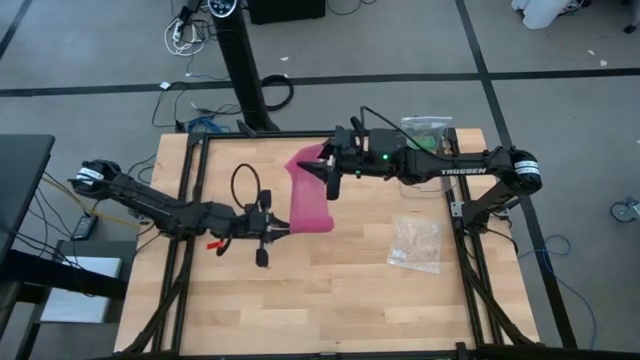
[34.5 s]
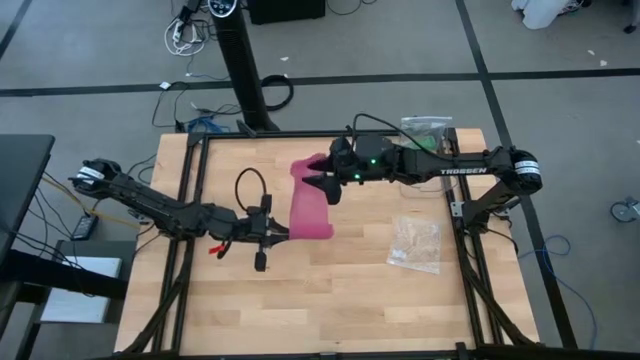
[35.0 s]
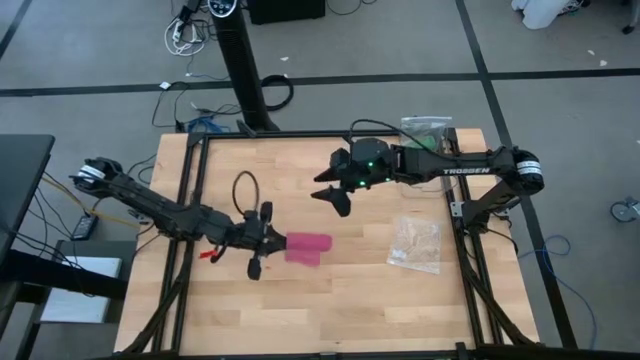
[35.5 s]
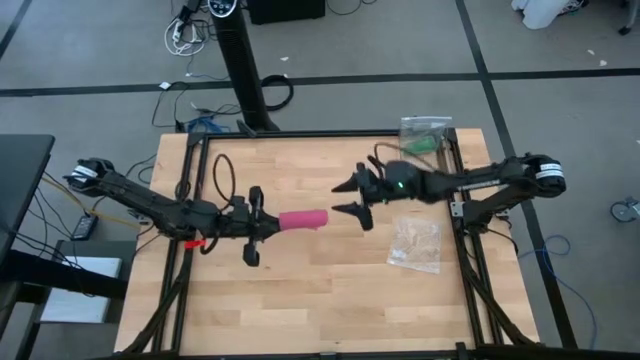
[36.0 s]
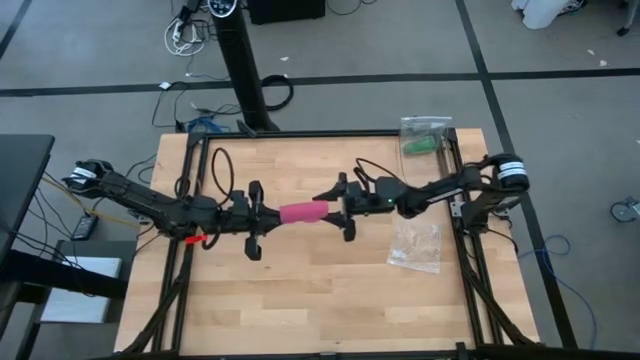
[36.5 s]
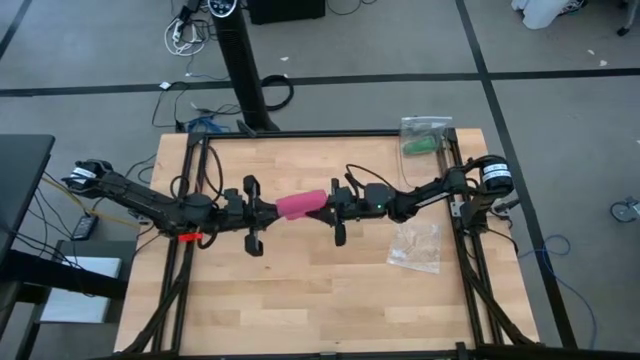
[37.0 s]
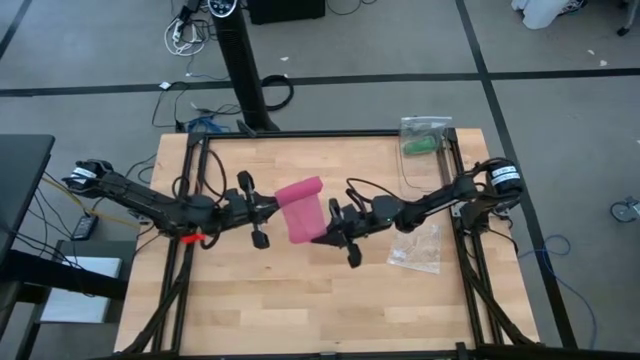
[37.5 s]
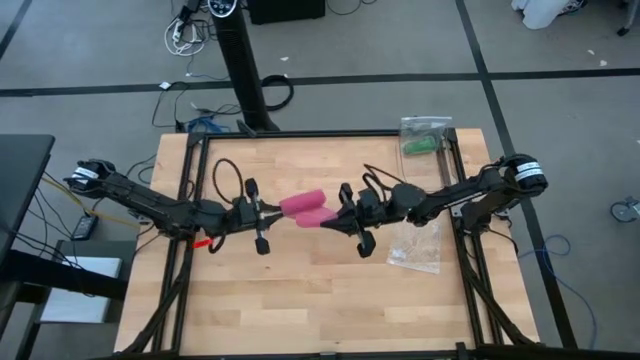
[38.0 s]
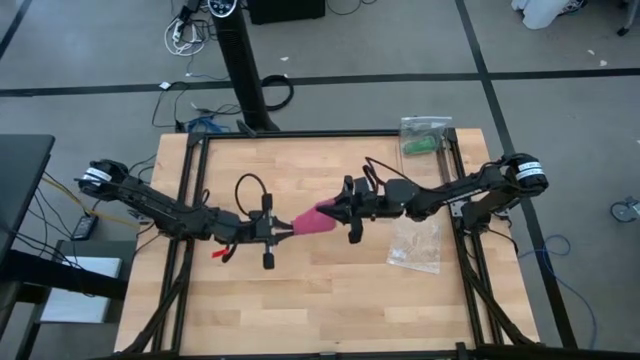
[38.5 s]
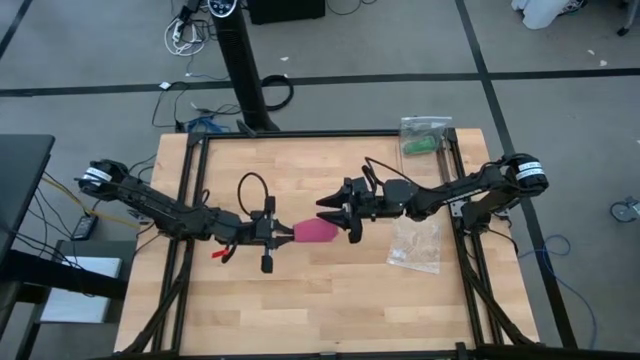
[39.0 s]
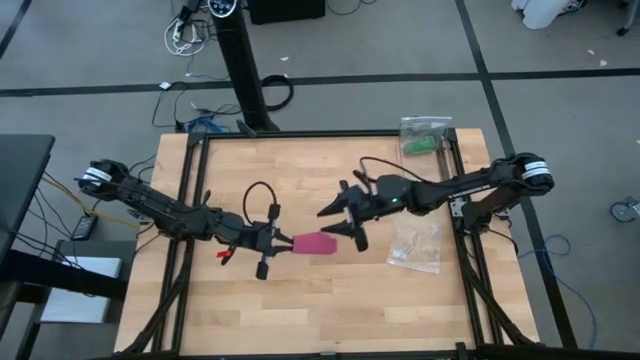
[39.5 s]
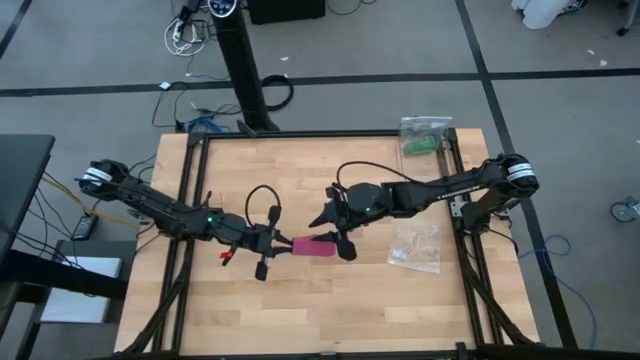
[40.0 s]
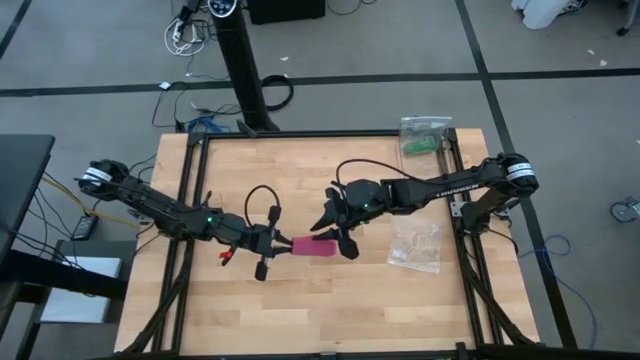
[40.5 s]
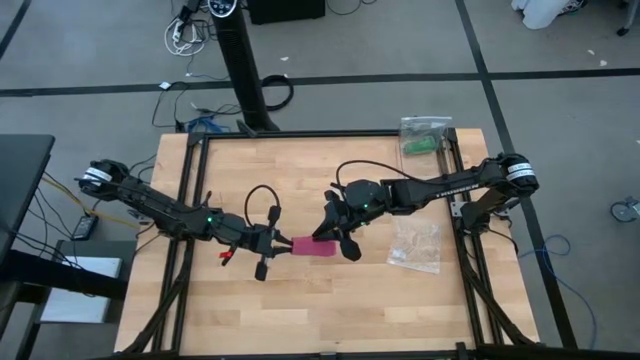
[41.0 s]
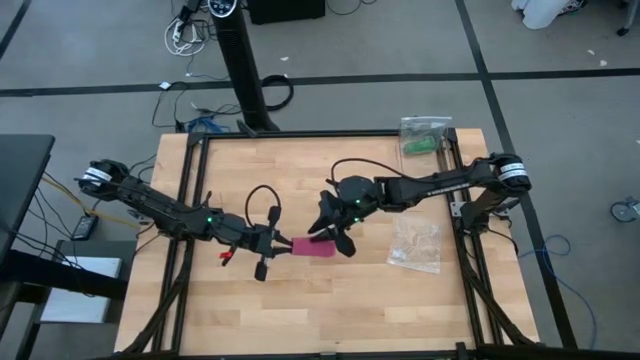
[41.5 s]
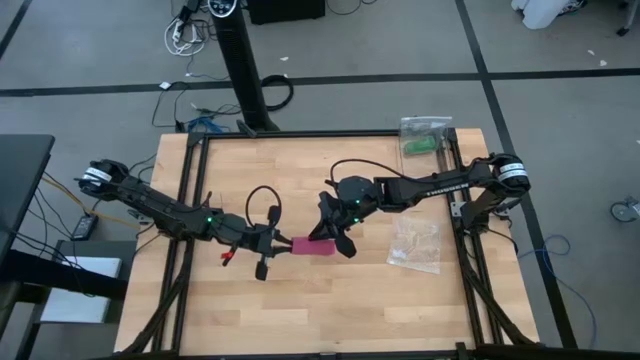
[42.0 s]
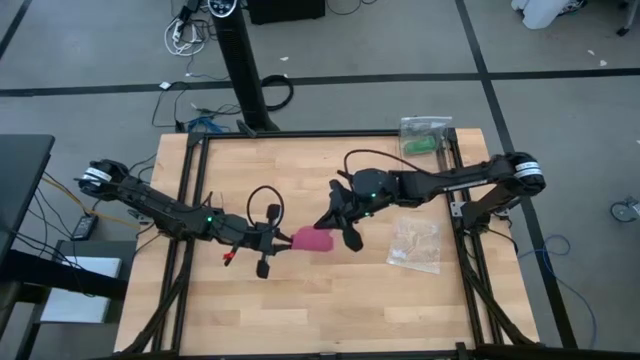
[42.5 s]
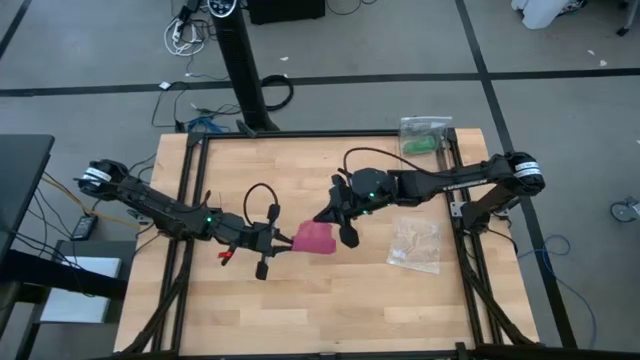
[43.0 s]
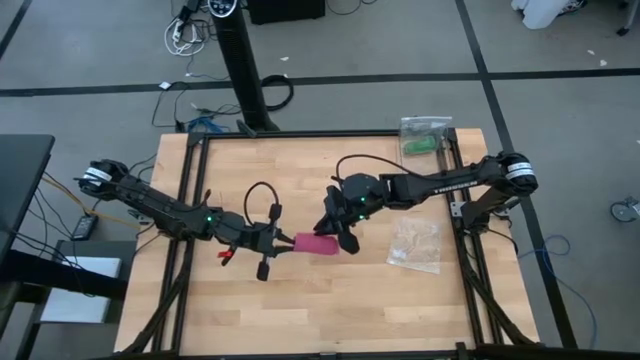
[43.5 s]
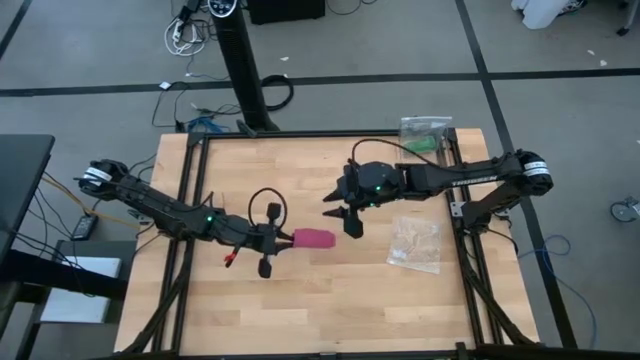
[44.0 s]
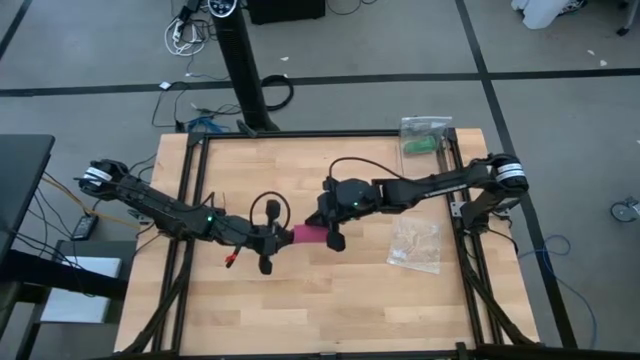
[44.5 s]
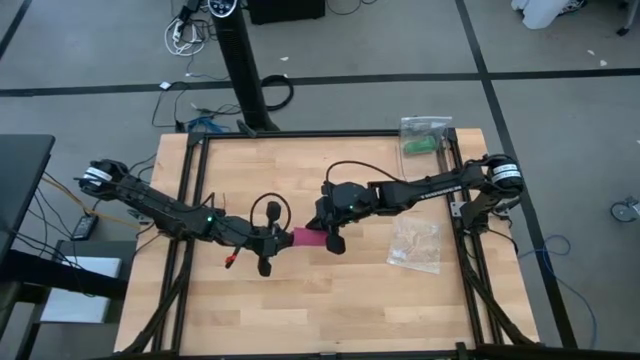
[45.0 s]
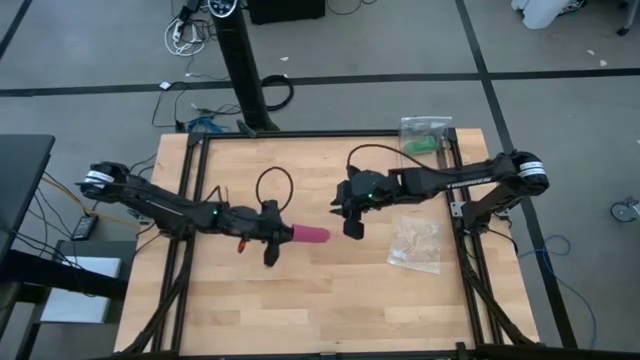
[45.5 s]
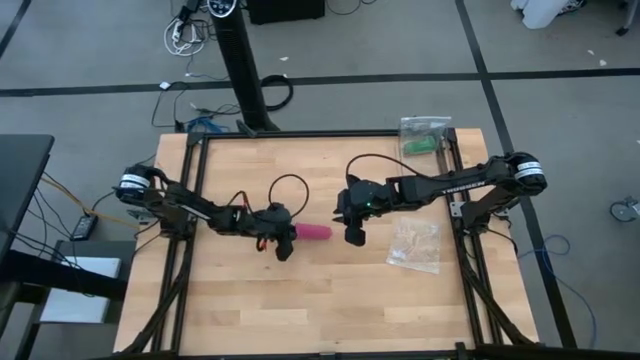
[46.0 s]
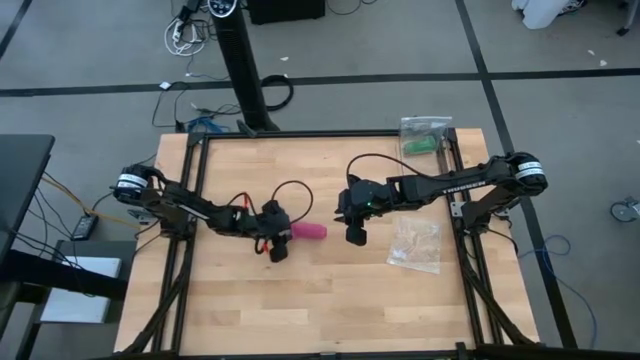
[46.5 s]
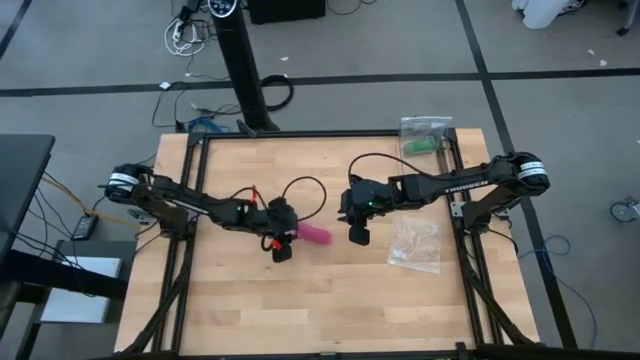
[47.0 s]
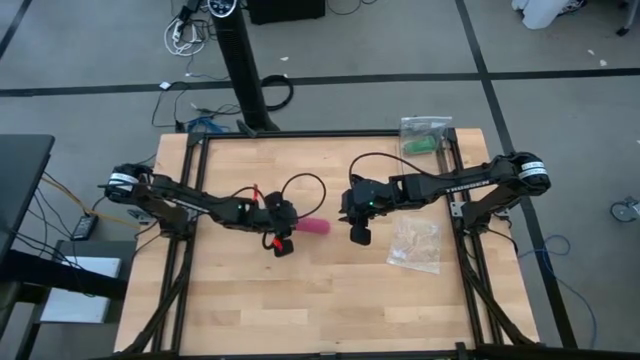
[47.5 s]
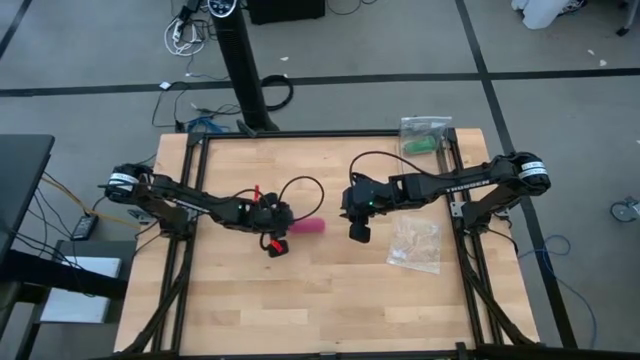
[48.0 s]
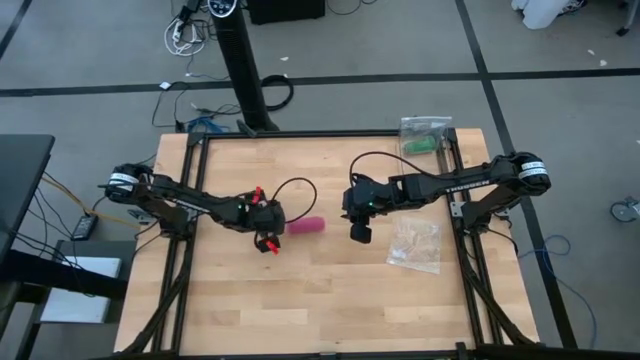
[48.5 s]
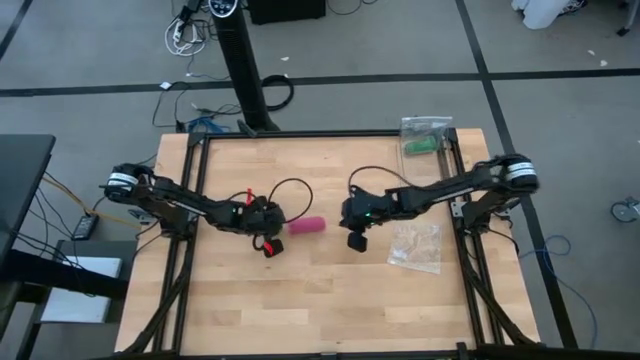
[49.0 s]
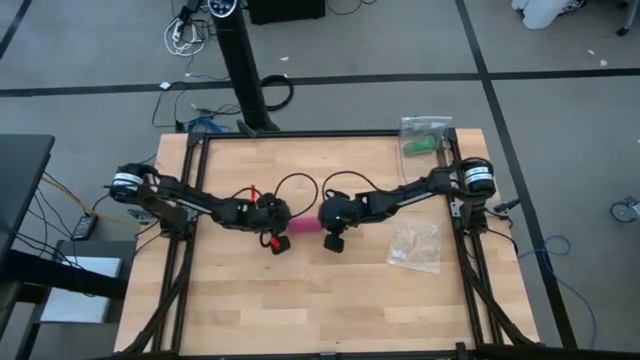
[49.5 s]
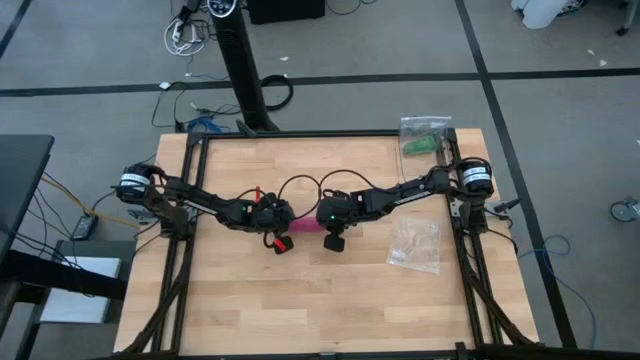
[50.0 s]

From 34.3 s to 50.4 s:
Task: Roll bandage
Roll the pink bandage

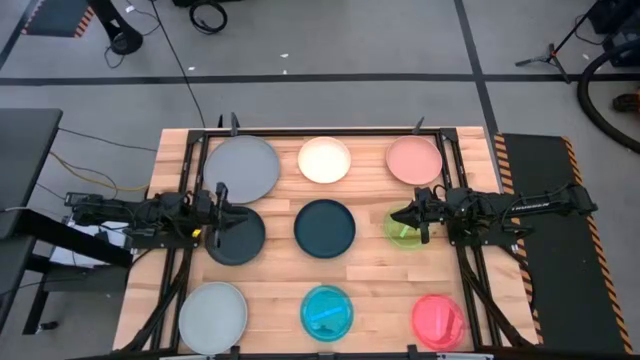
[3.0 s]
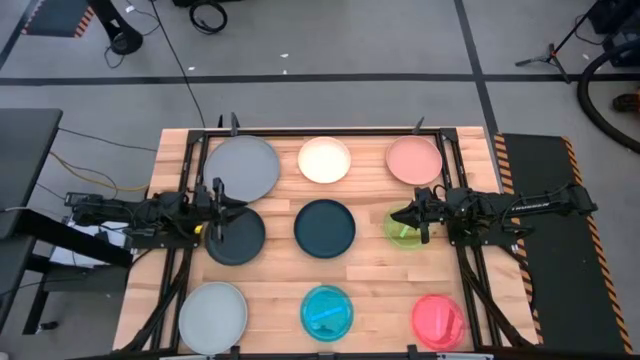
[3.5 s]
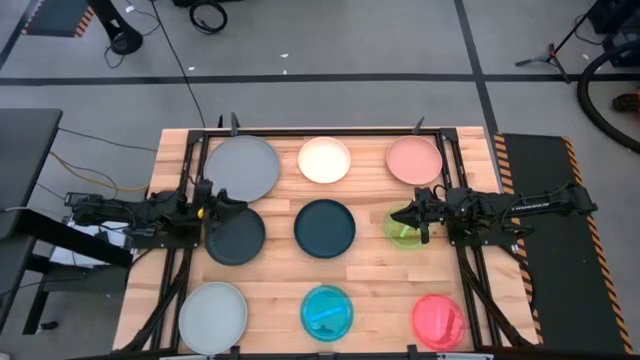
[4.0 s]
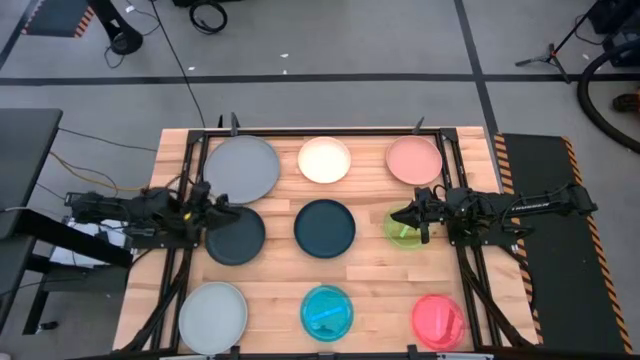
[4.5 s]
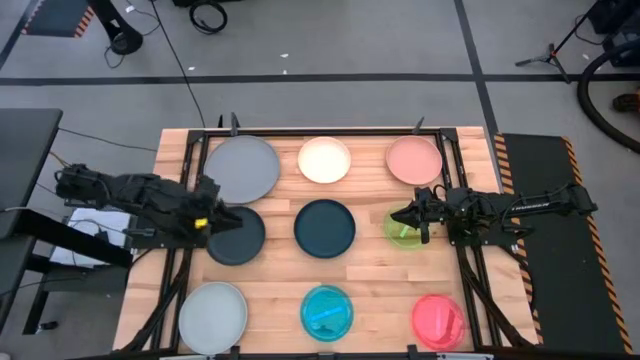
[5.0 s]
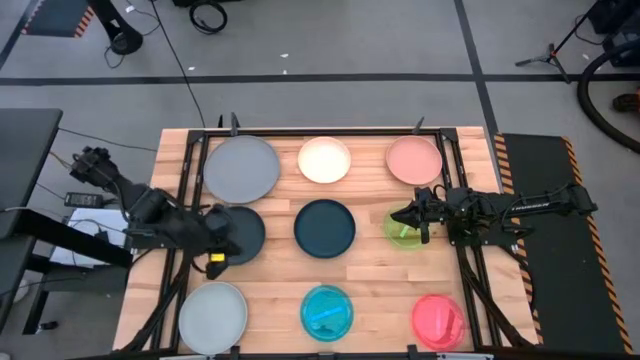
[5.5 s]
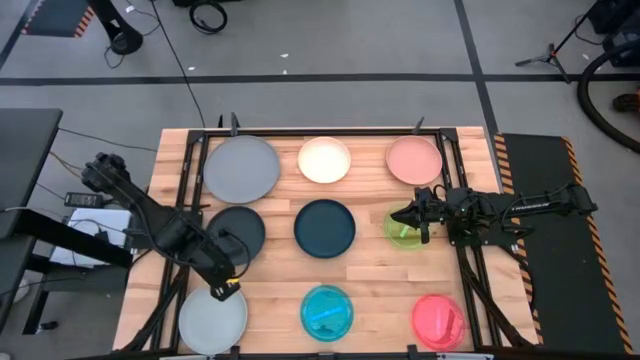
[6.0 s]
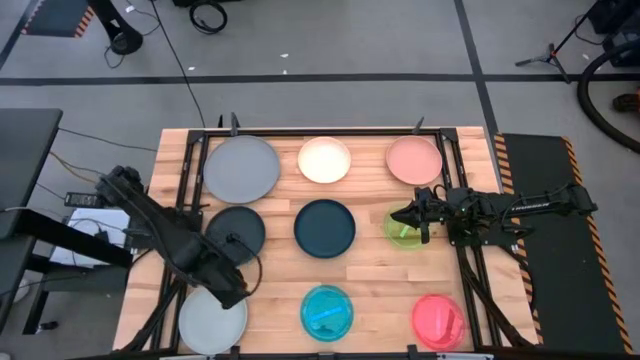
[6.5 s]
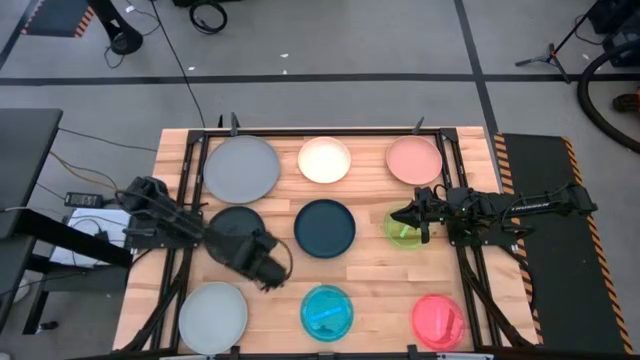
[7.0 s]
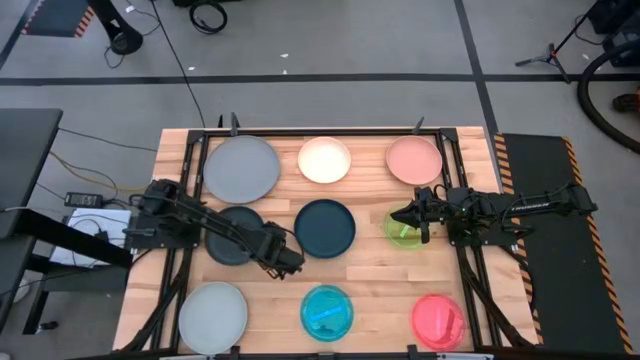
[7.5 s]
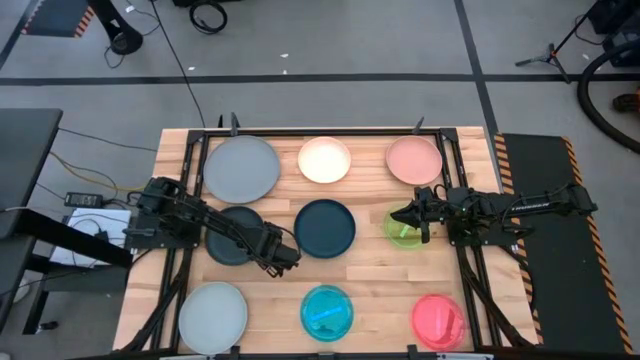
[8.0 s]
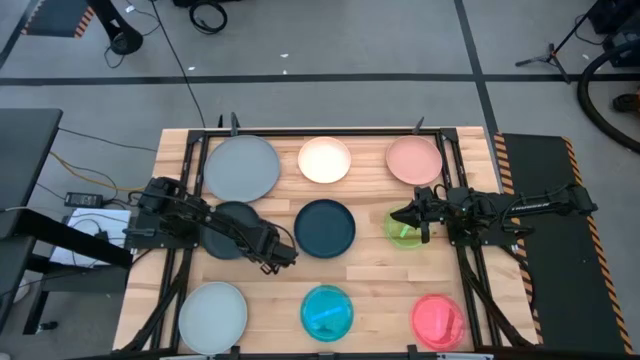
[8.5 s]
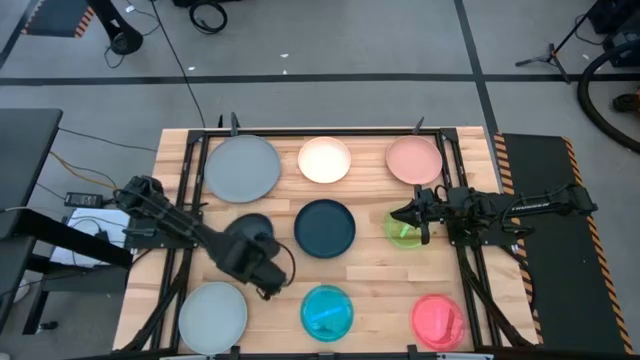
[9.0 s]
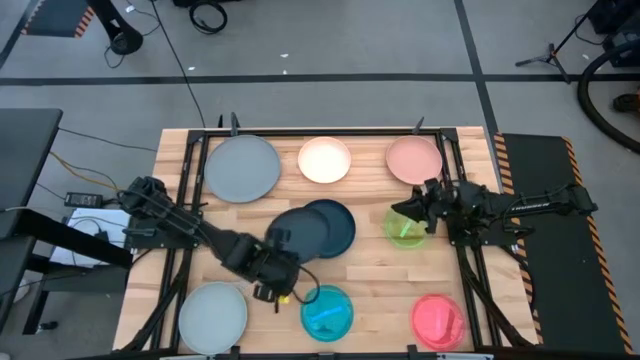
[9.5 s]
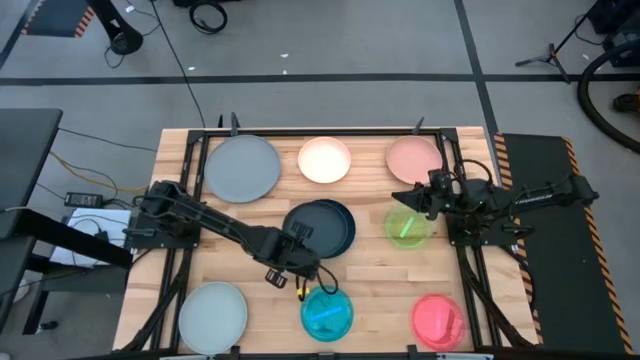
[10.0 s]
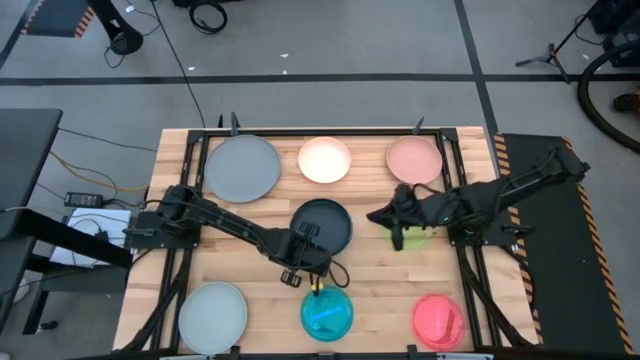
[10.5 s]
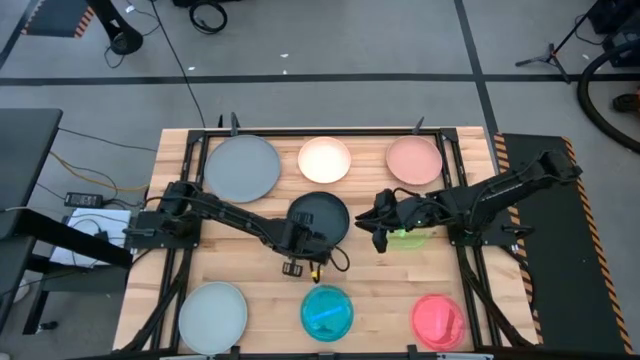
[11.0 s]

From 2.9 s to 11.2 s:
Task: Stack plastic plates
Stack the black plate on the dark green plate
